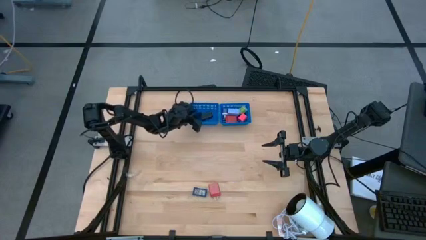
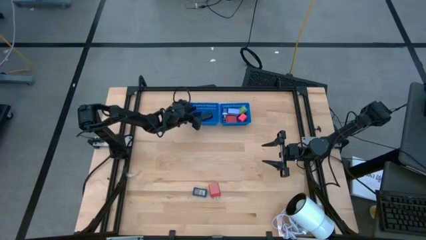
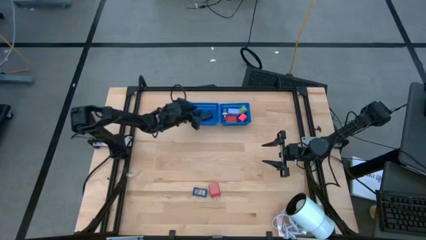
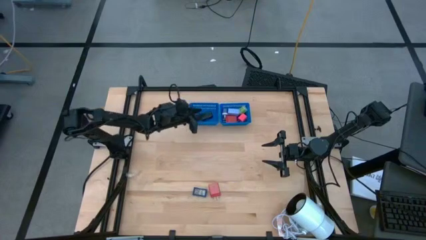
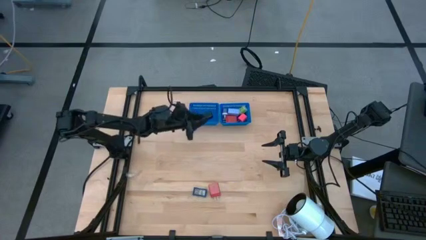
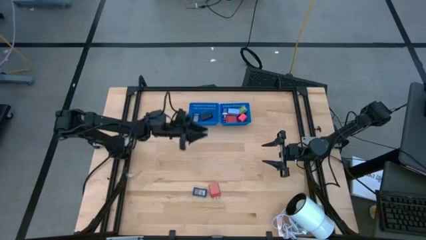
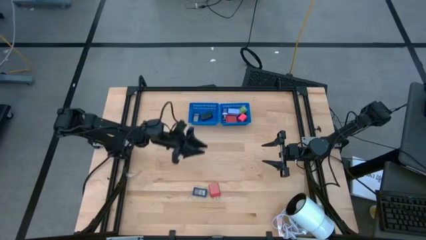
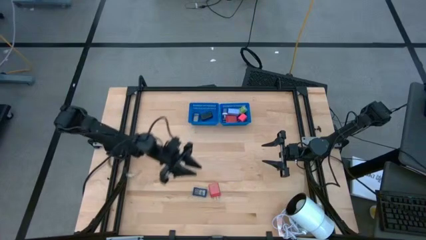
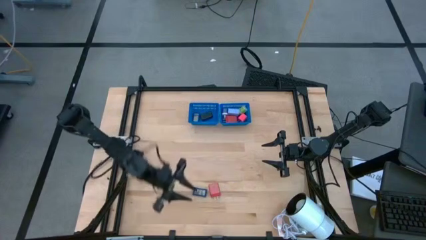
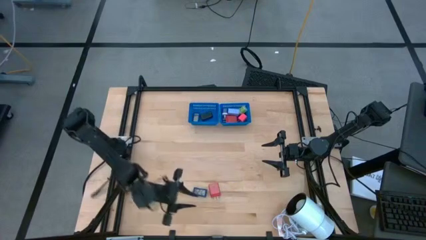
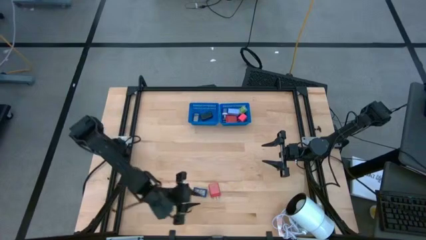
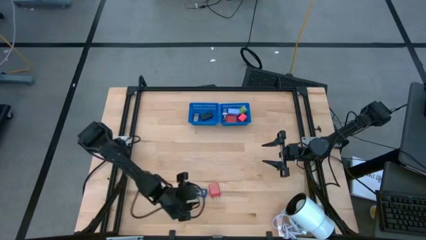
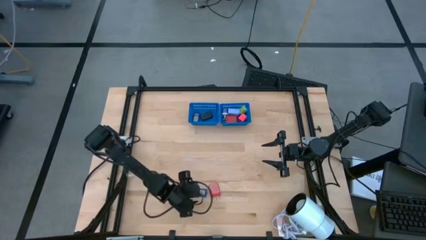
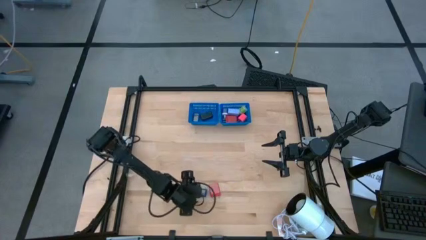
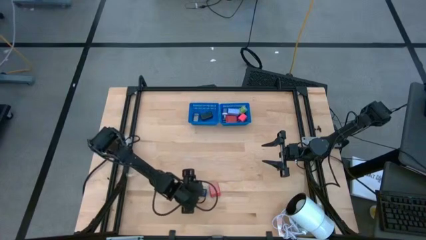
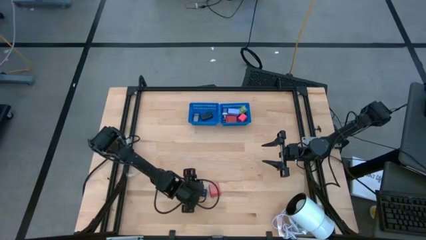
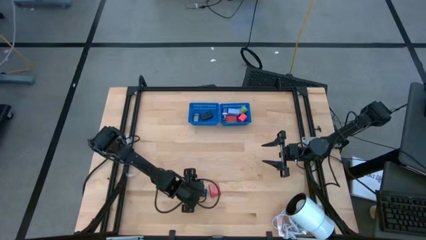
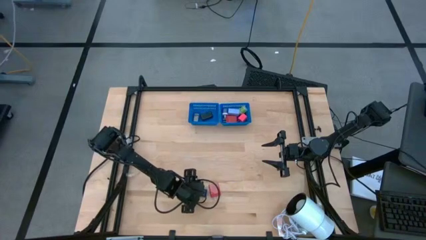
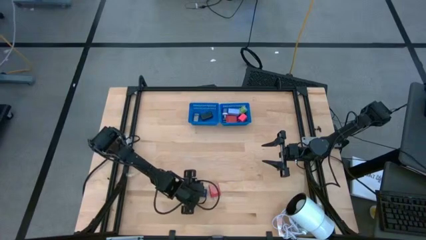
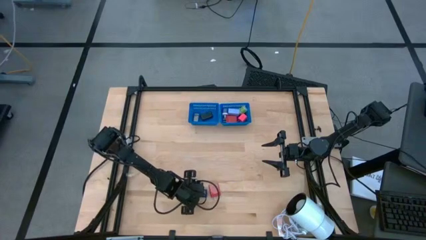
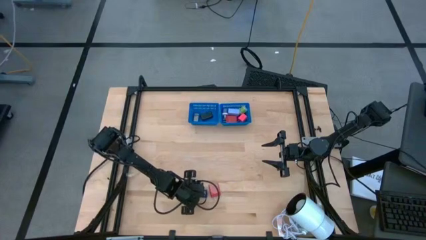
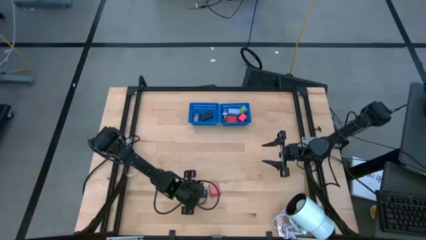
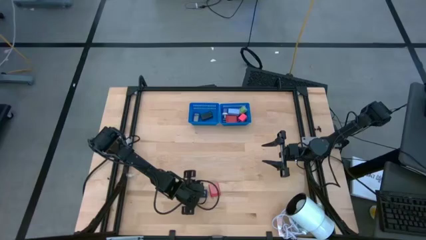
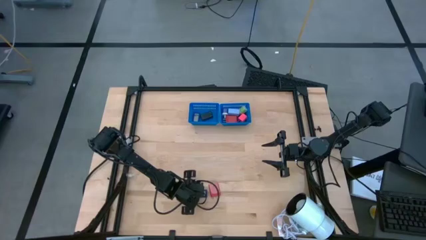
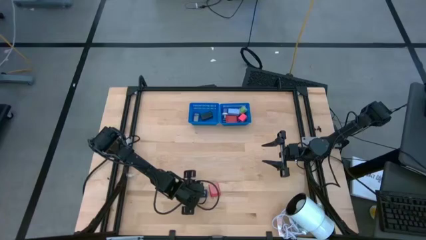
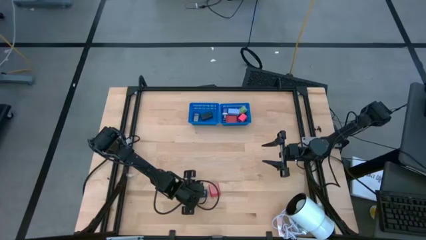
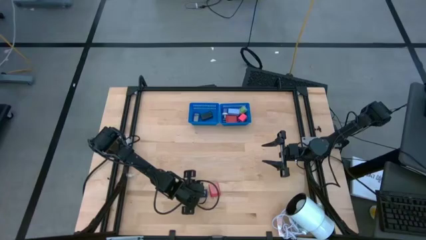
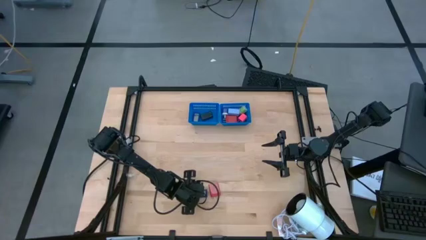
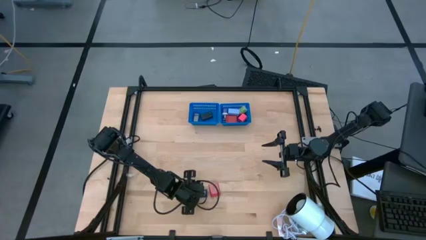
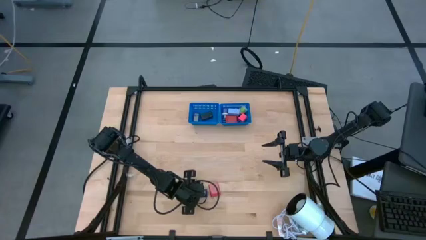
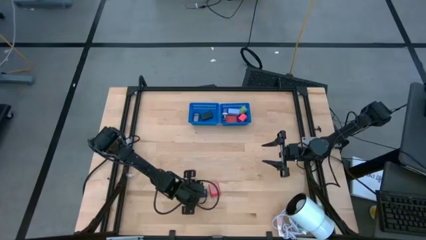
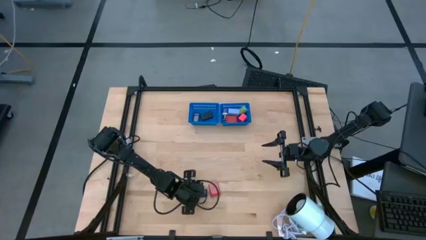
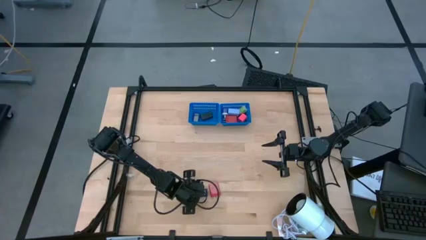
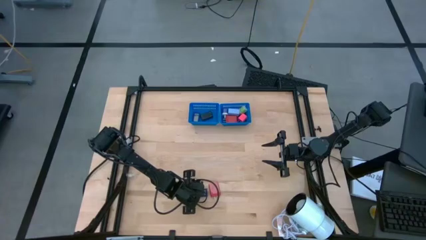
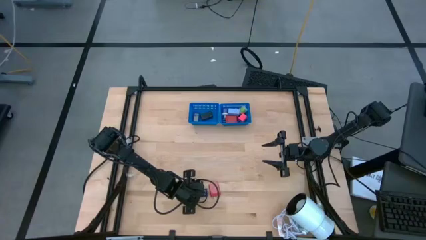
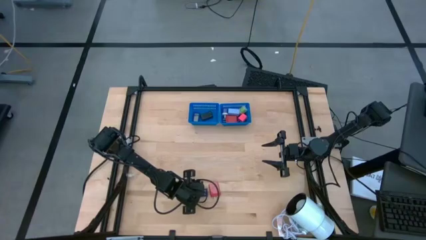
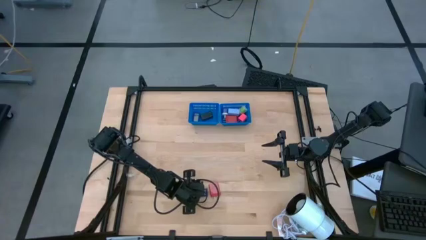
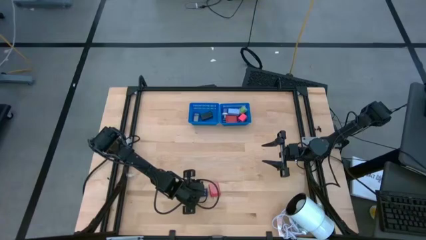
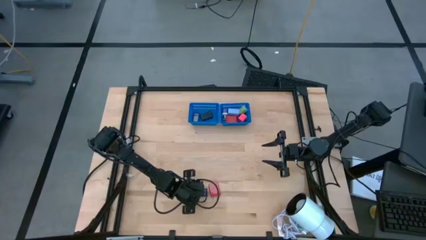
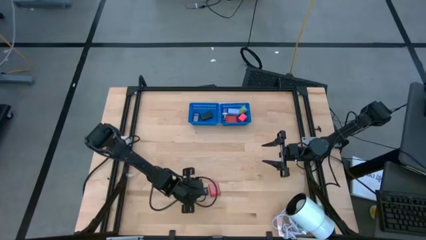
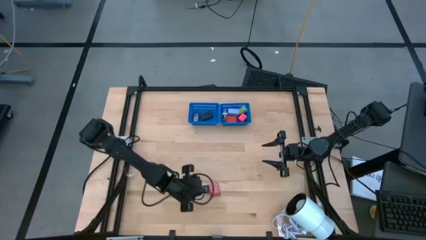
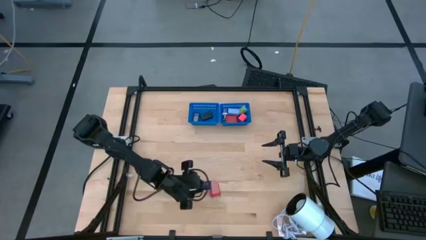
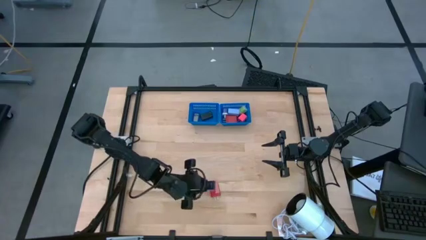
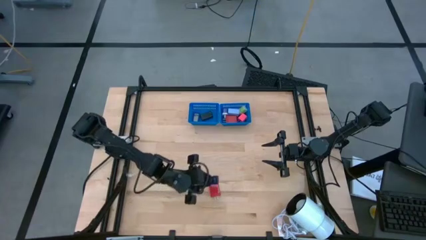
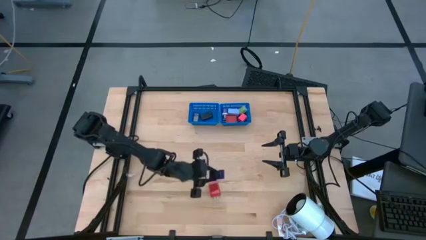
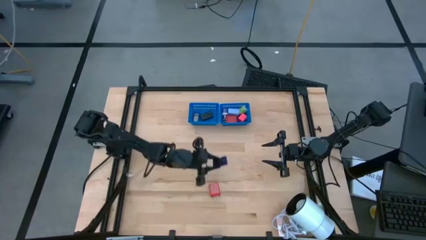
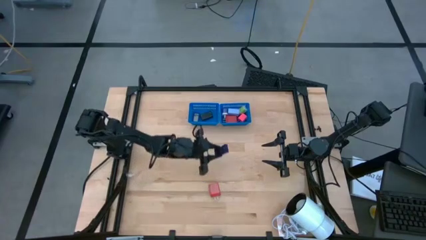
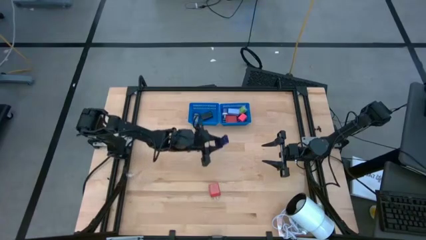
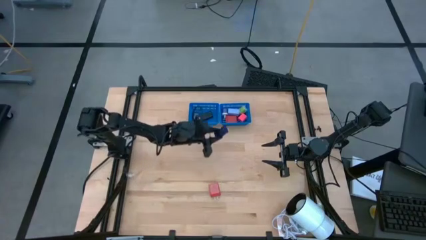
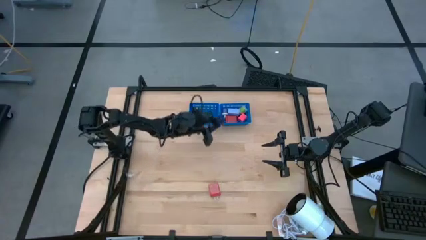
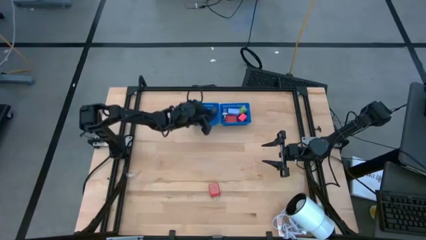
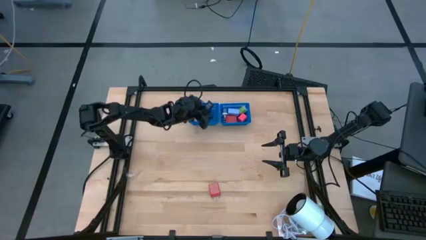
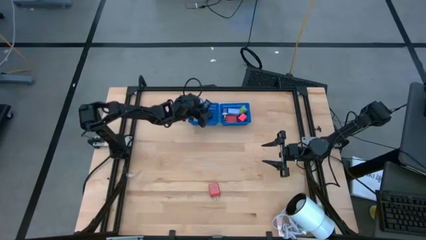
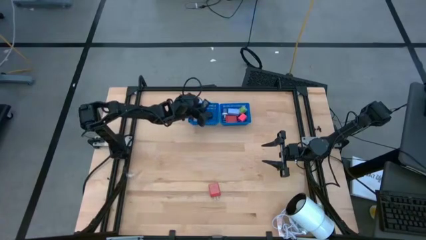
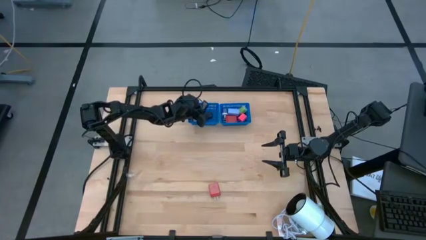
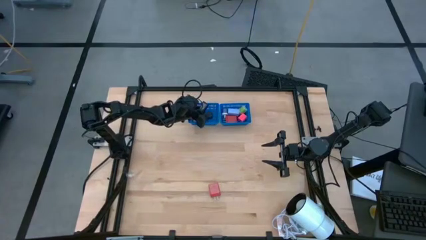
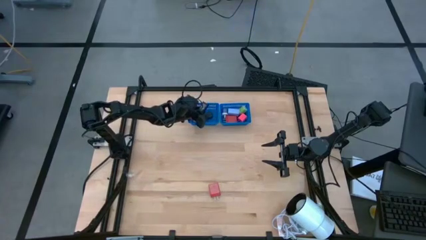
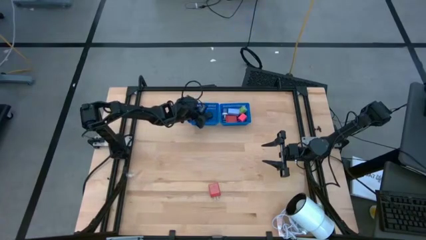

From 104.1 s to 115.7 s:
Task: Pick & Place Office items
Put the dark blue timer into the left blue bin

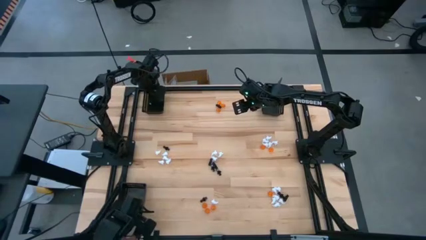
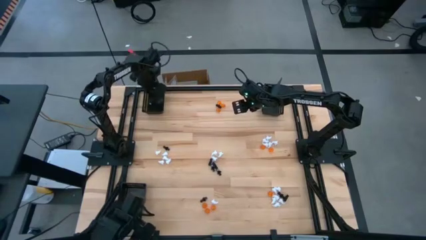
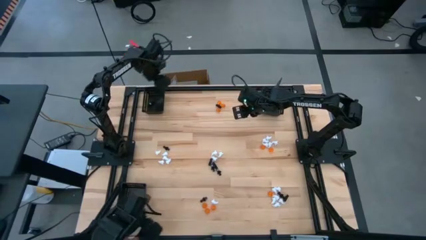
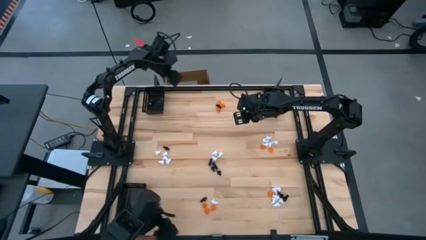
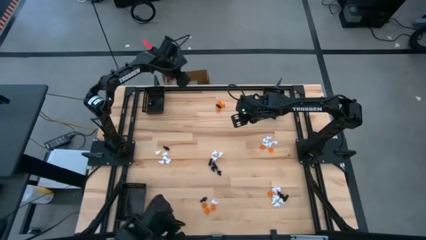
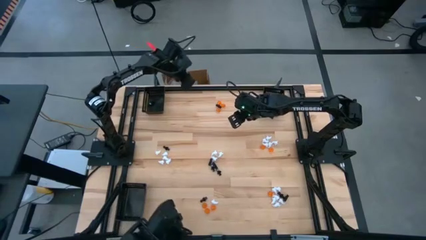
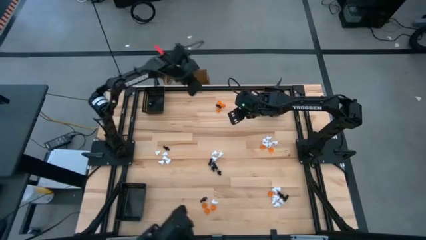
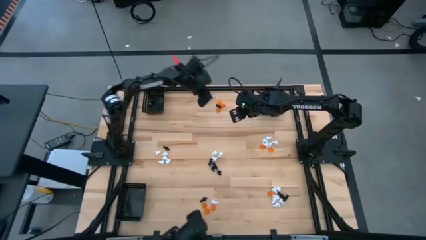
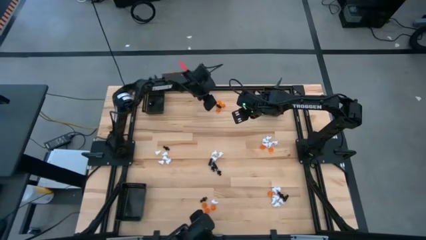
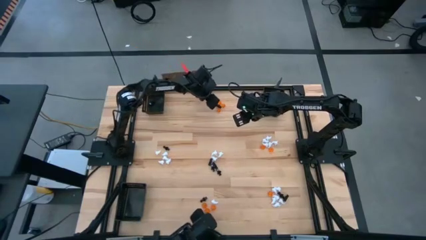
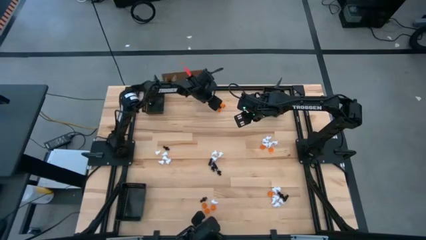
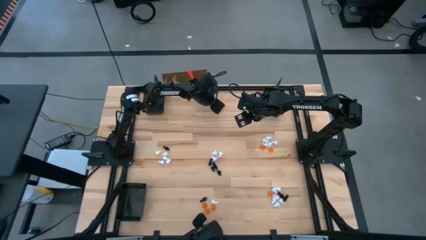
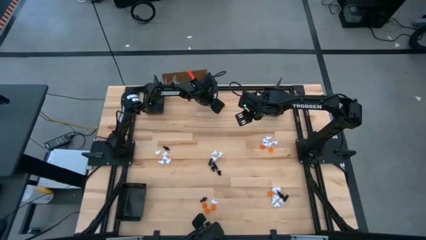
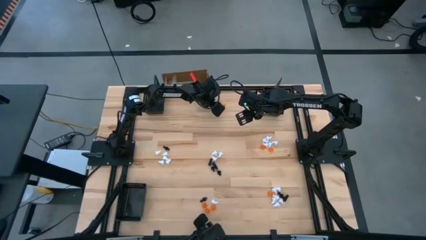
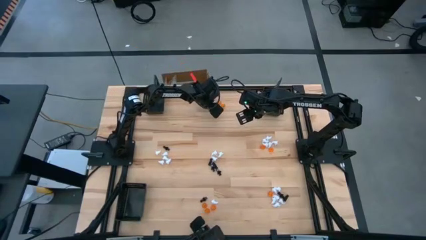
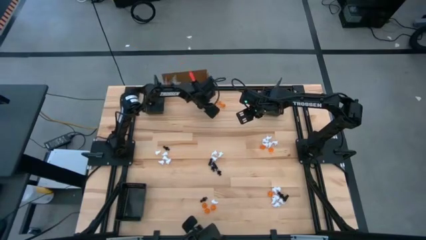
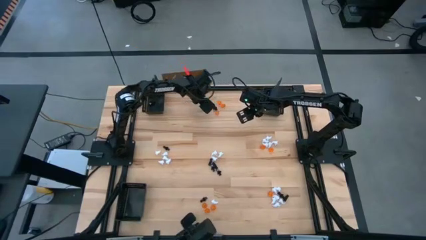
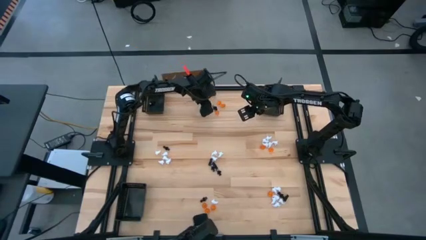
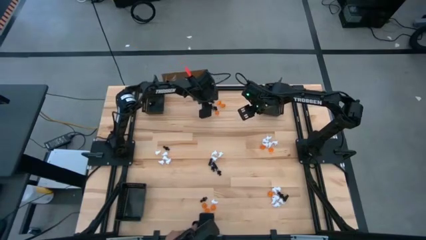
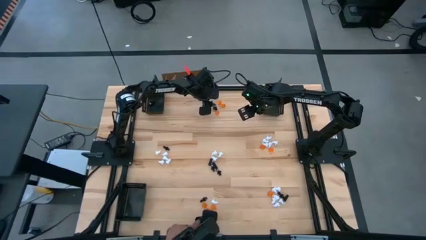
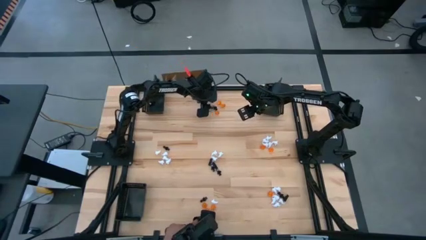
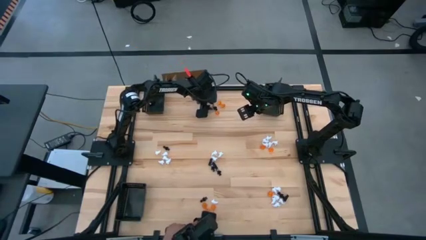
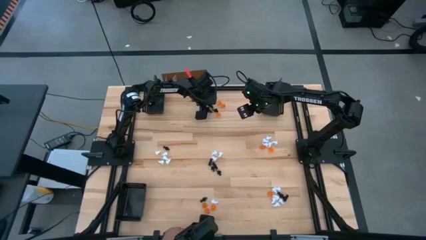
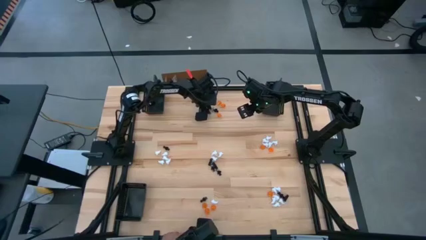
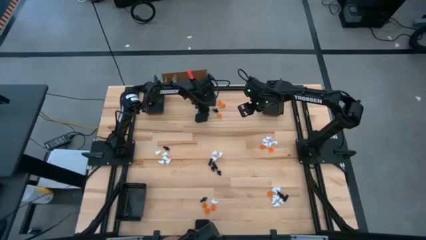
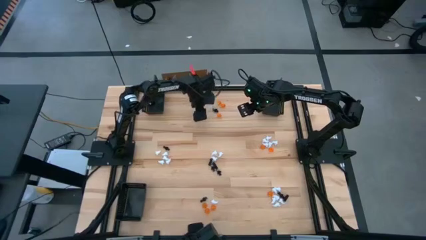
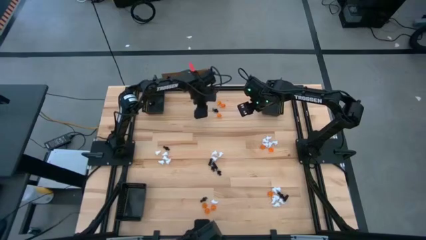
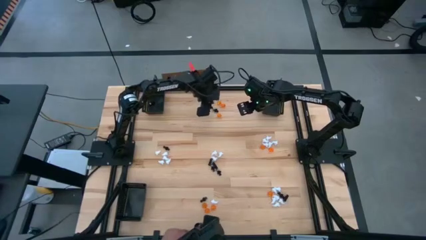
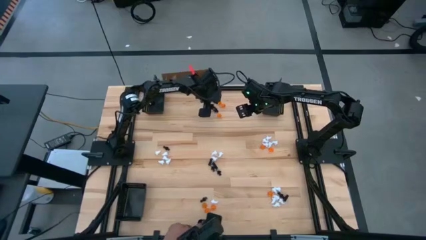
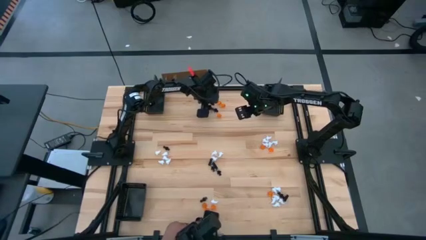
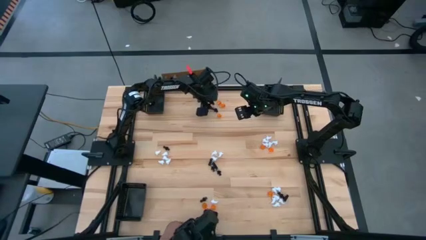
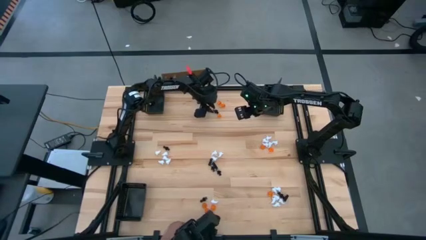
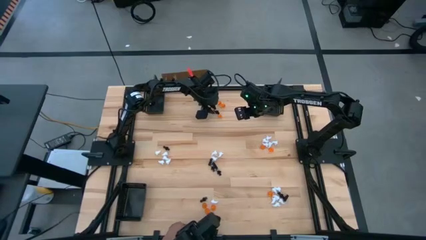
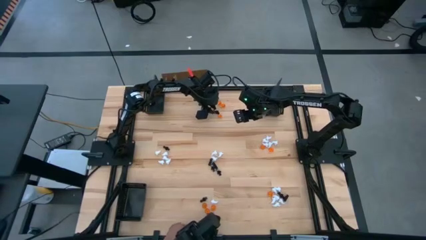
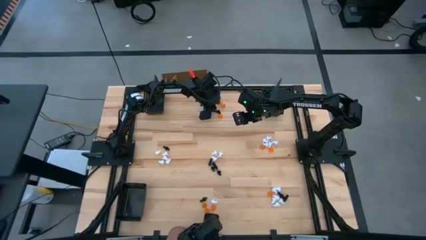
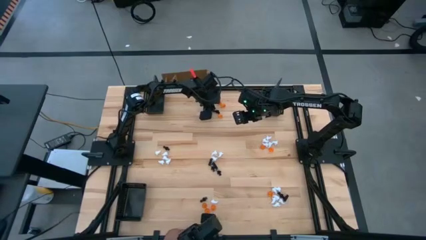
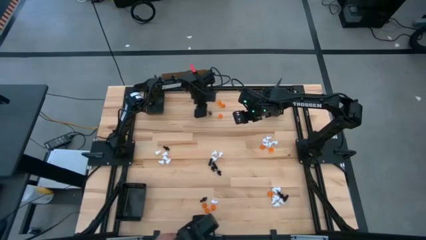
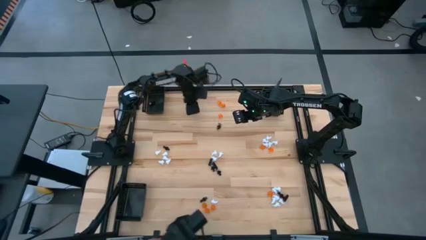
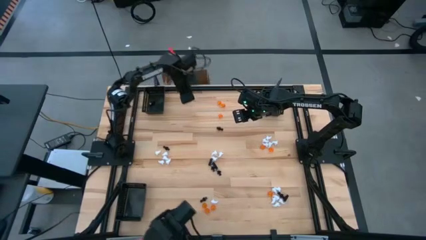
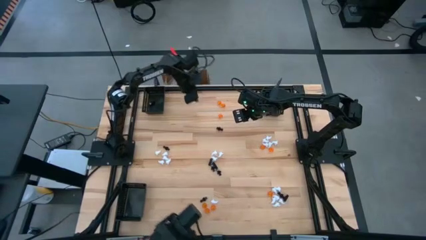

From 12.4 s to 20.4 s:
Task: Sort Halloween decoration
Put the black skeleton toy into the top left black basket
